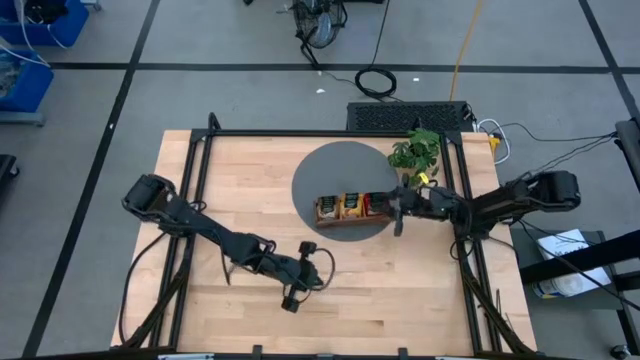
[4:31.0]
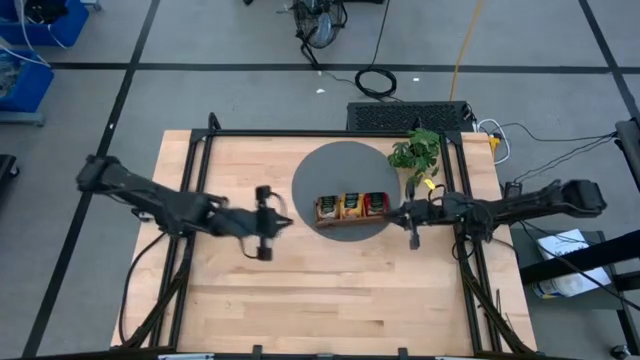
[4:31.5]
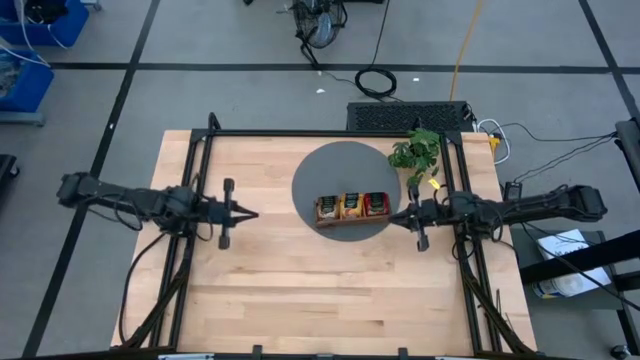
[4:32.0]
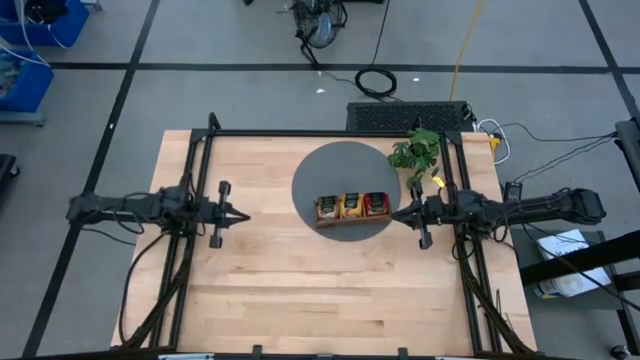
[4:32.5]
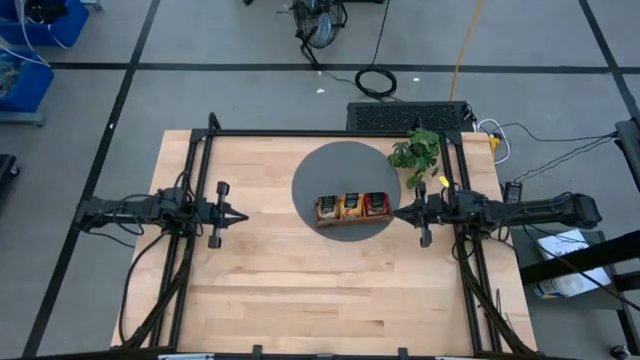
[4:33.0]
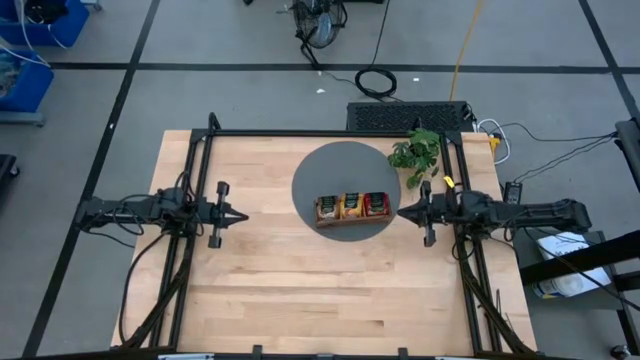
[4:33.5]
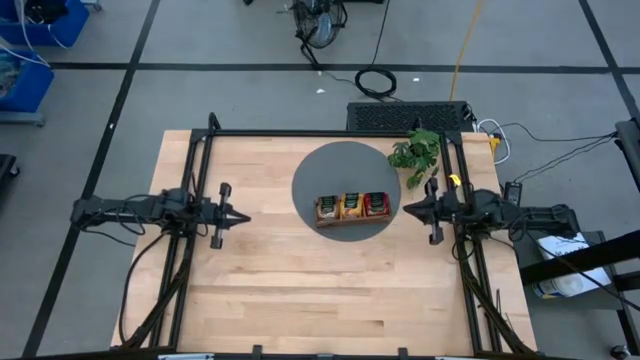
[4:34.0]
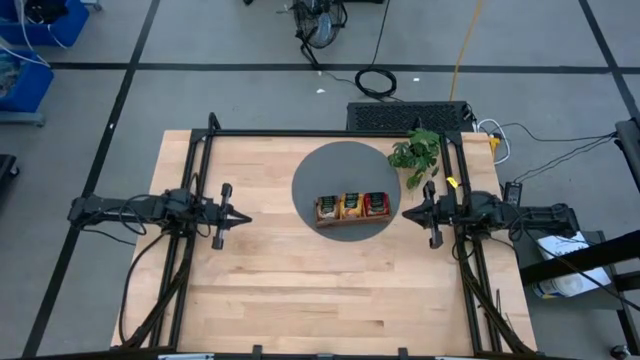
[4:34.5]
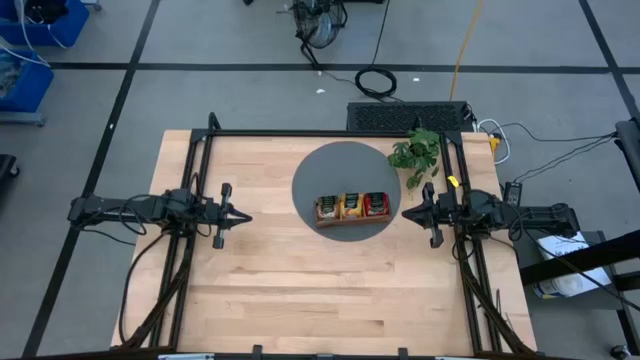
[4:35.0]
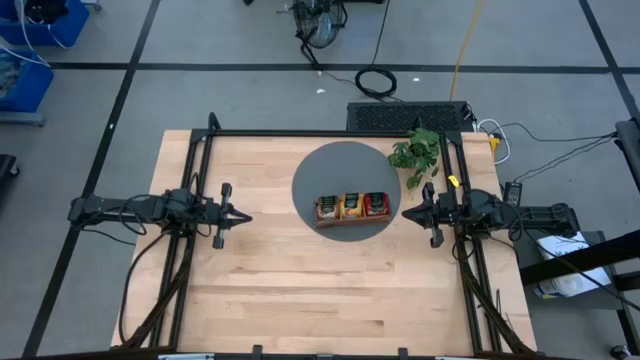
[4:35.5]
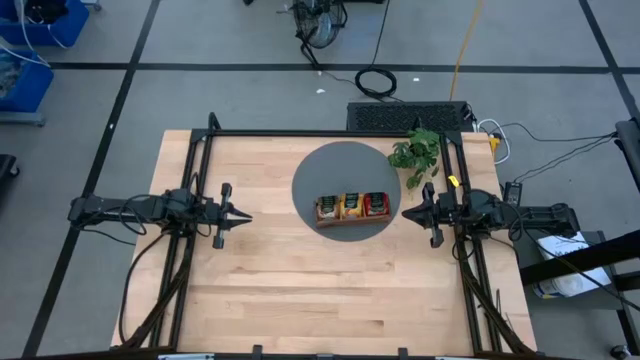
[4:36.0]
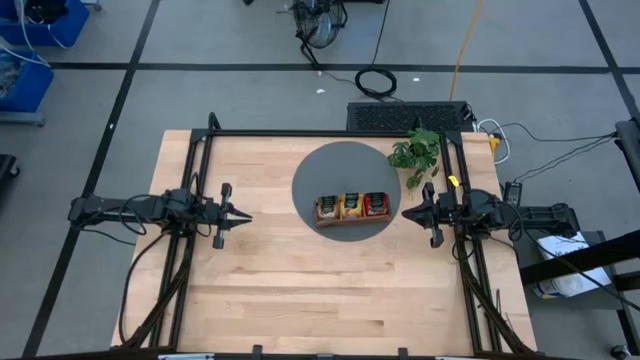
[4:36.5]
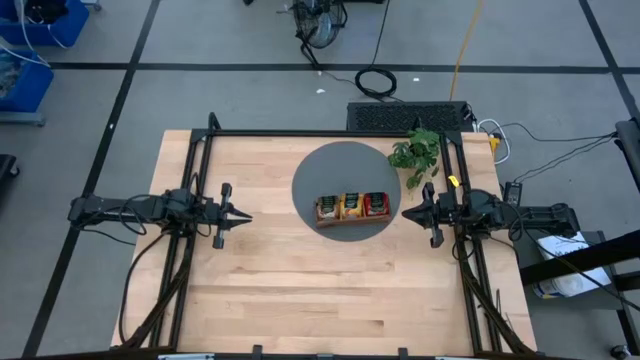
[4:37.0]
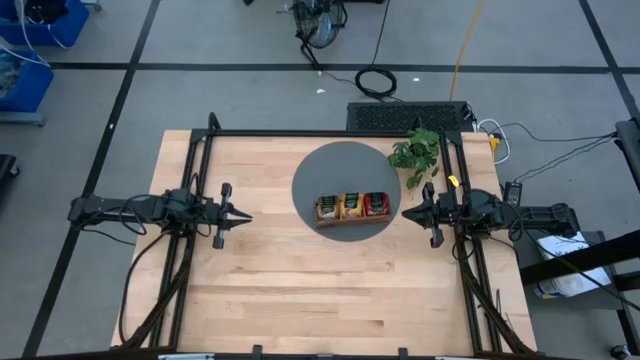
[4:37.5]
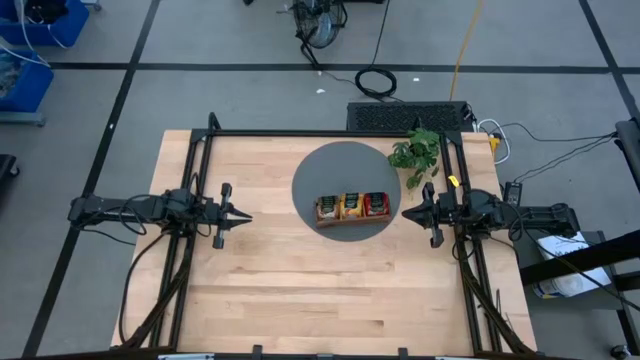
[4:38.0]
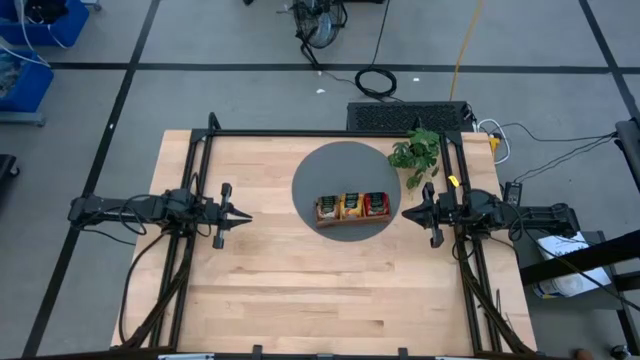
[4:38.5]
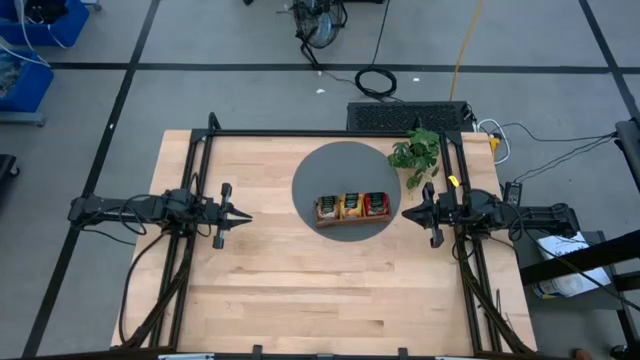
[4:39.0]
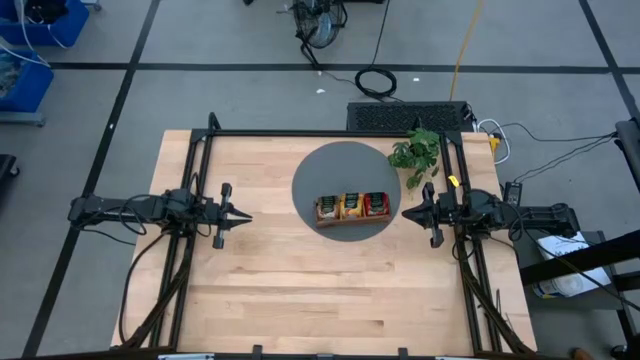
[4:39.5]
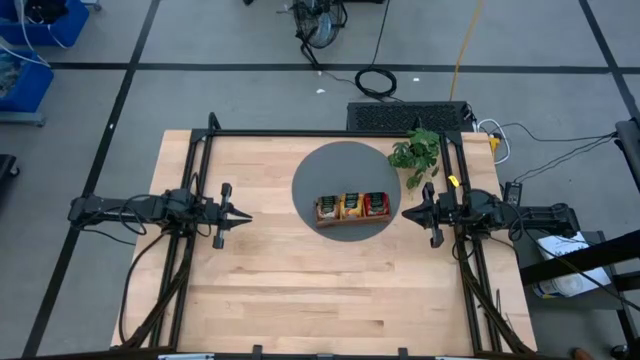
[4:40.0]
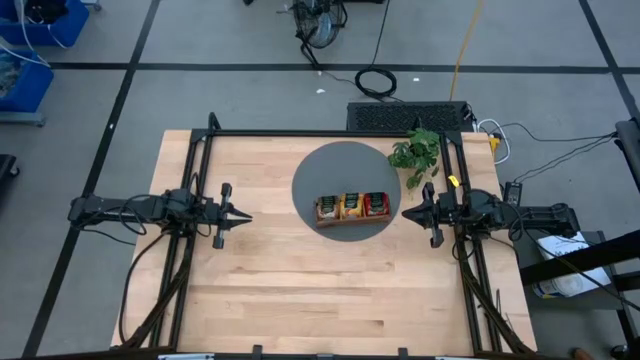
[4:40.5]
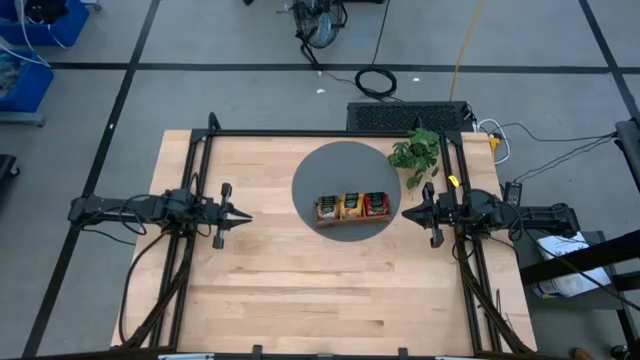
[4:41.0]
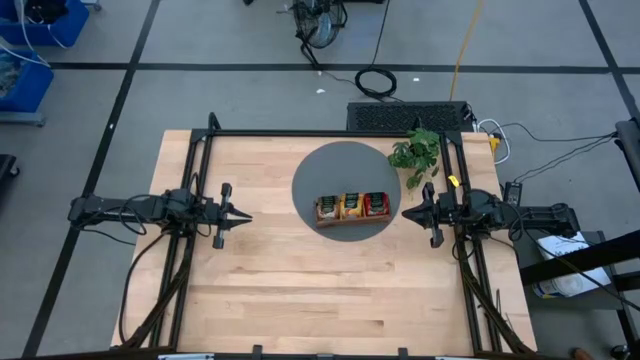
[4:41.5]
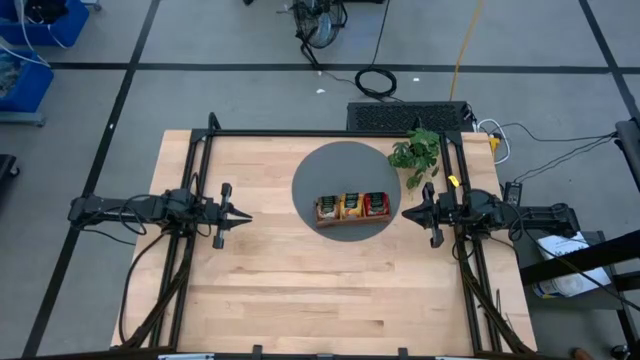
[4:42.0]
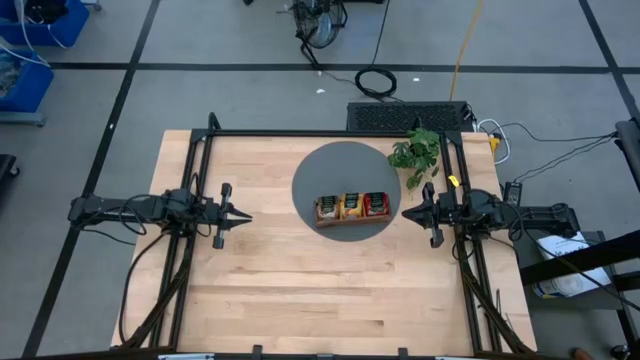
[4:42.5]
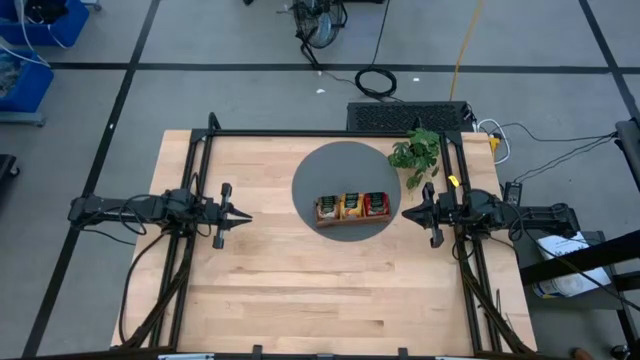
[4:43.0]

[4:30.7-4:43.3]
Task: Pick & Place Tea
Return to Home Position

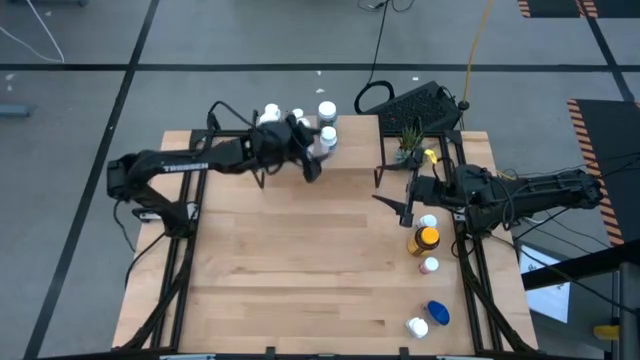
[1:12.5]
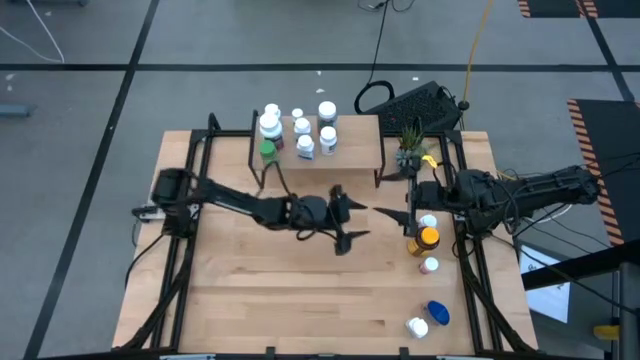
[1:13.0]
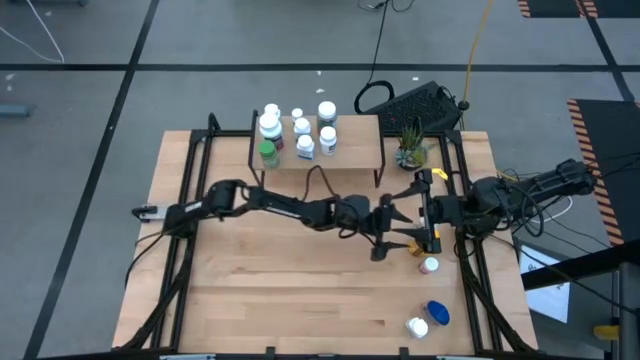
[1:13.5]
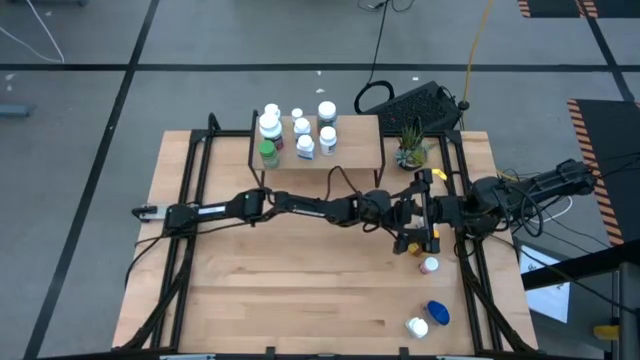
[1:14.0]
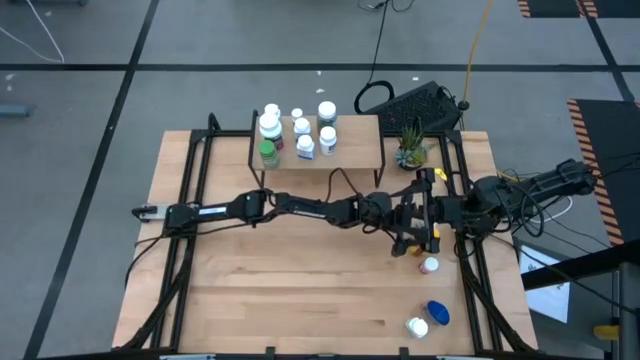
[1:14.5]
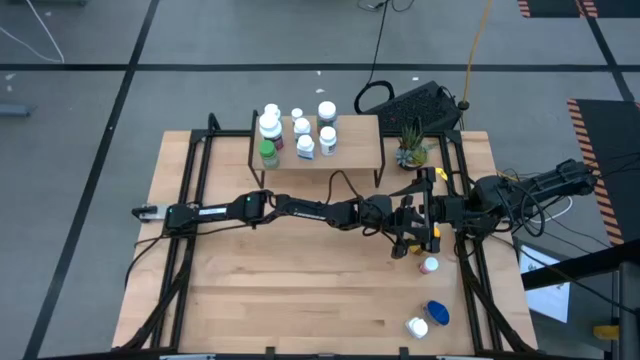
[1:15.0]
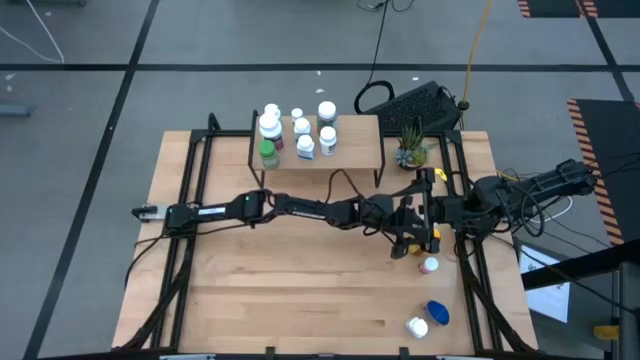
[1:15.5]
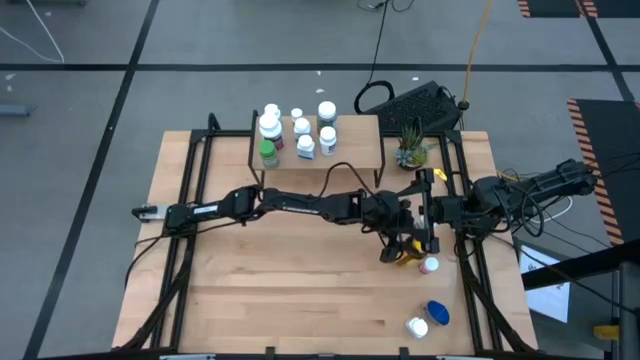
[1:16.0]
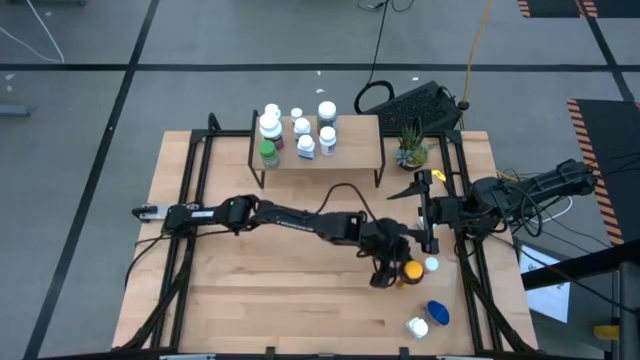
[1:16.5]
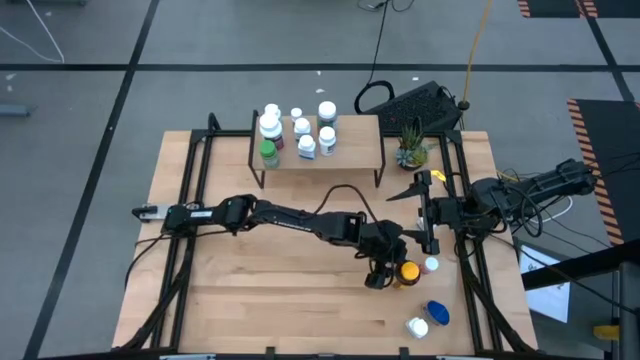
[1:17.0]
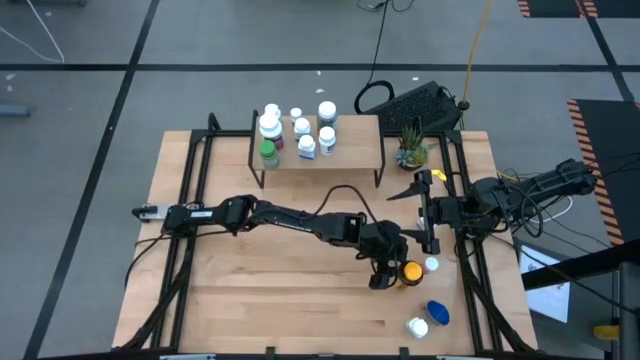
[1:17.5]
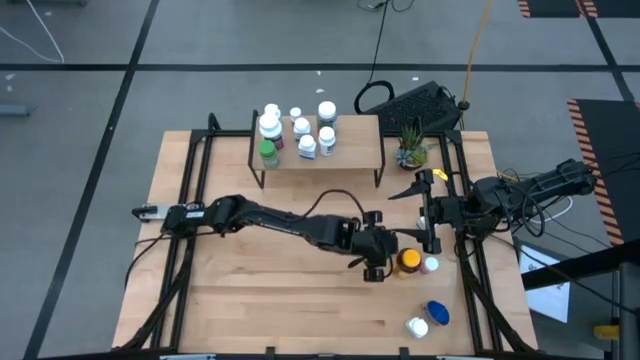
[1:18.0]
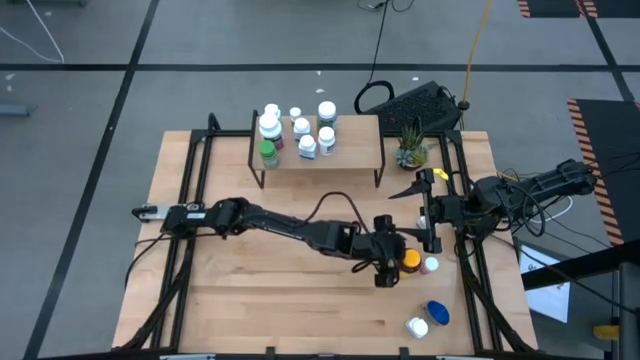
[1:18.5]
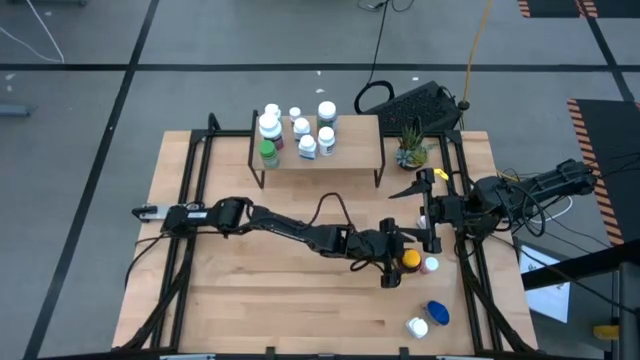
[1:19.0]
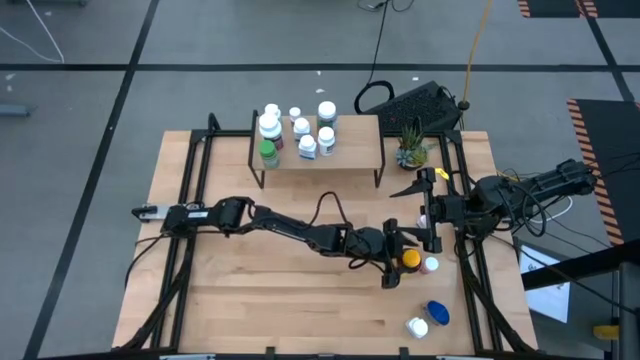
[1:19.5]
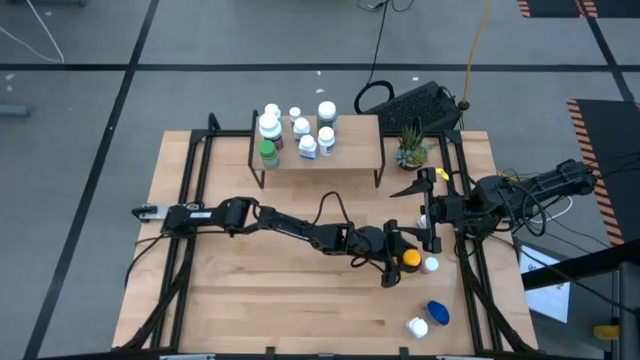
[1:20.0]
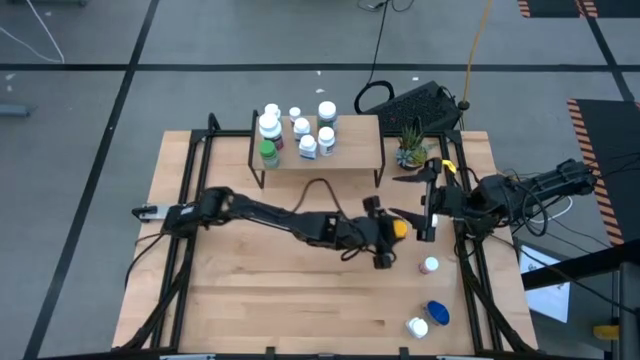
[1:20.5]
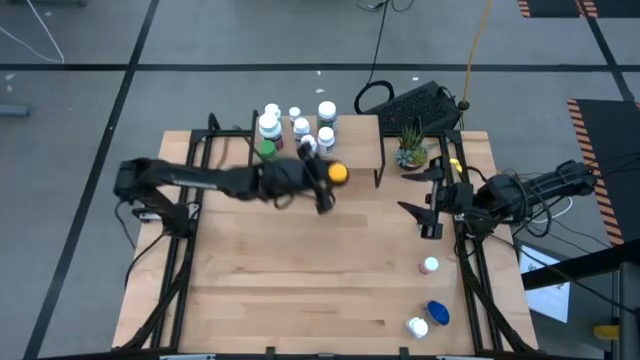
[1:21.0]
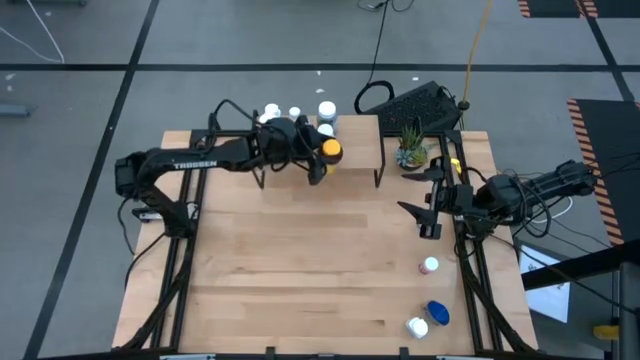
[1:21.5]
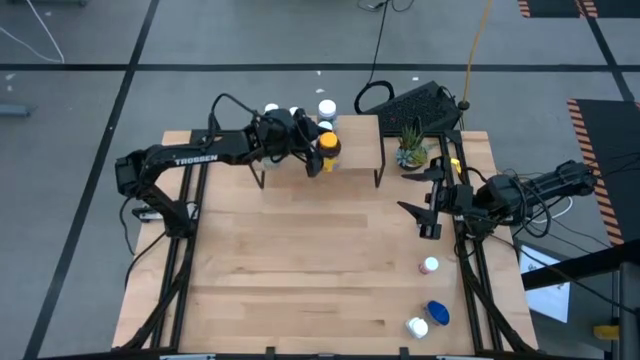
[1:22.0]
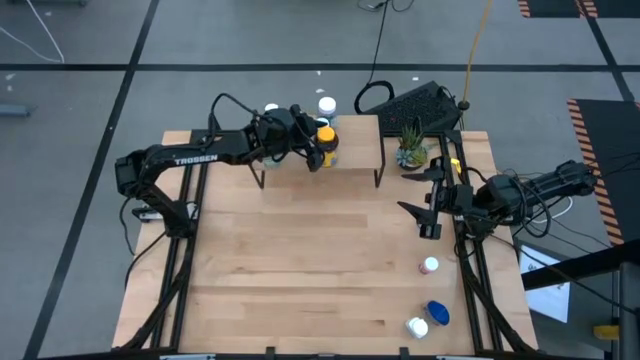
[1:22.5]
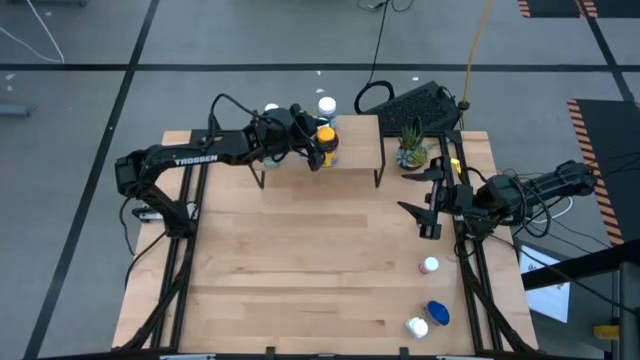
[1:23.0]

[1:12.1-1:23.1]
Task: Pick and place medicine bottles onto shelf by color
Put the yellow pill bottle on the shelf
